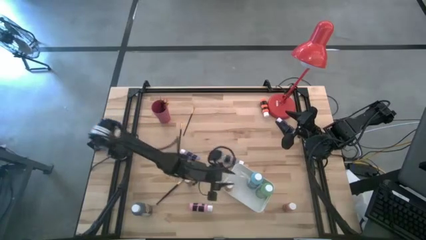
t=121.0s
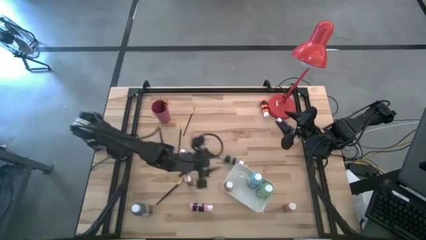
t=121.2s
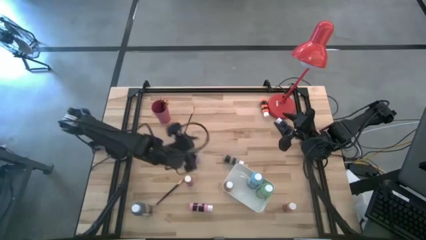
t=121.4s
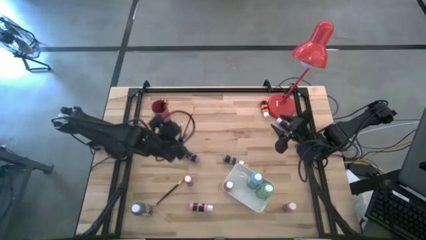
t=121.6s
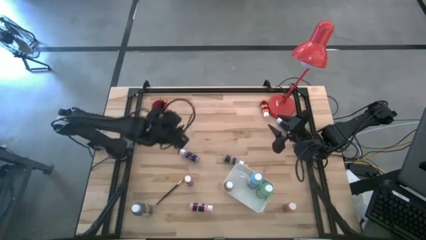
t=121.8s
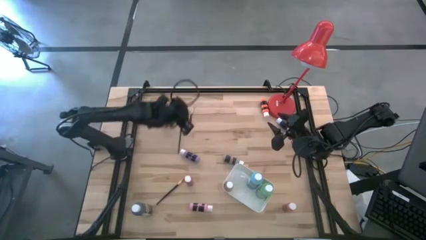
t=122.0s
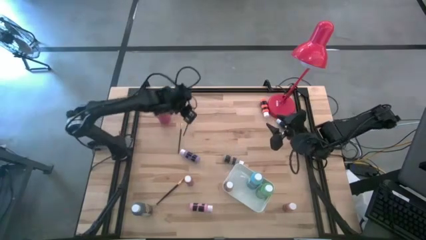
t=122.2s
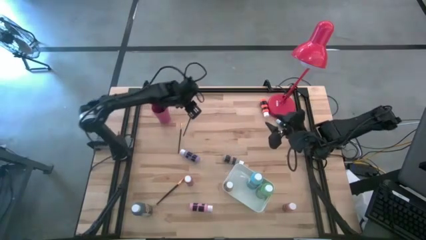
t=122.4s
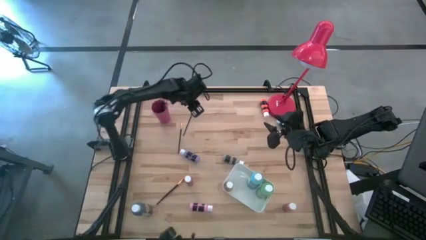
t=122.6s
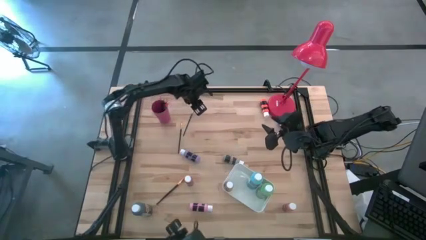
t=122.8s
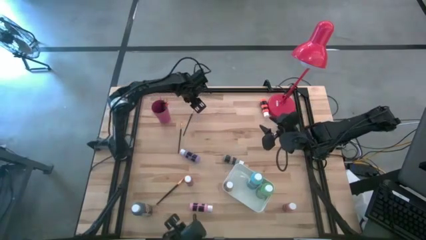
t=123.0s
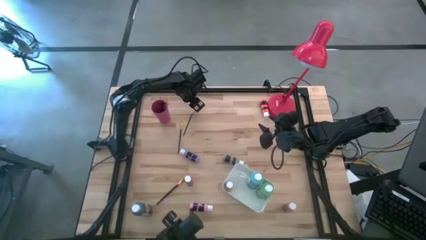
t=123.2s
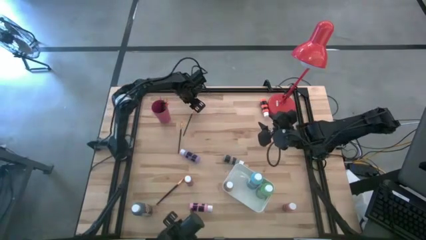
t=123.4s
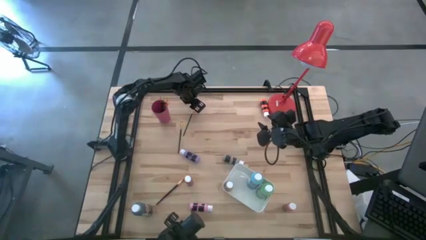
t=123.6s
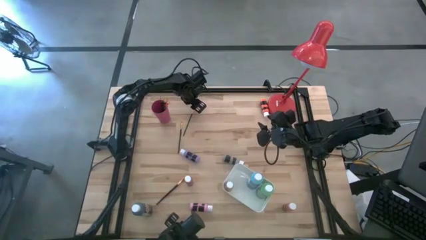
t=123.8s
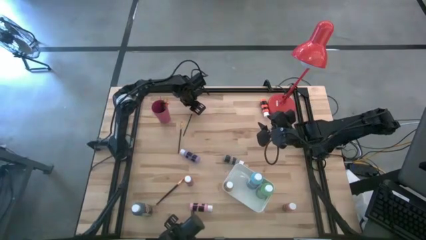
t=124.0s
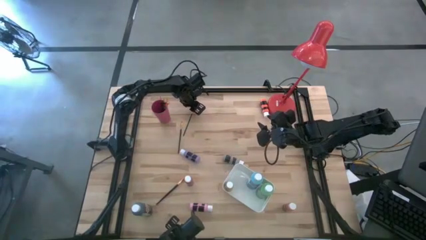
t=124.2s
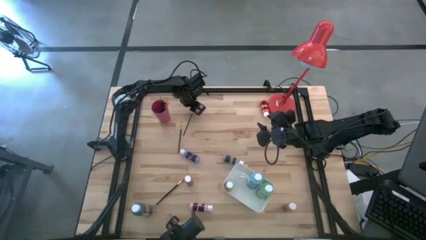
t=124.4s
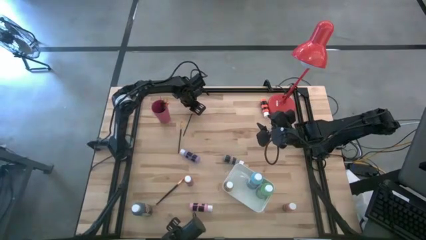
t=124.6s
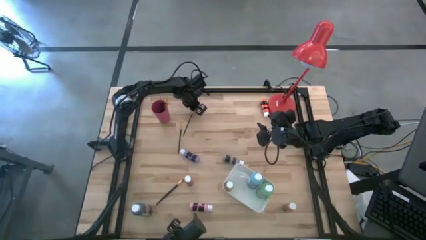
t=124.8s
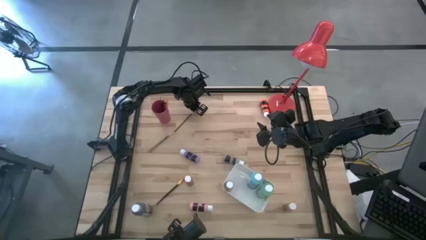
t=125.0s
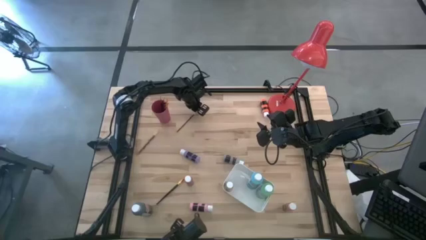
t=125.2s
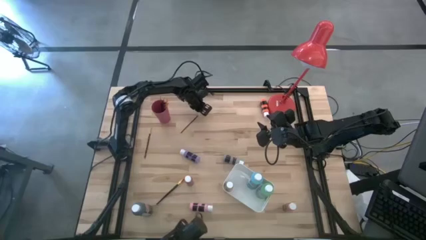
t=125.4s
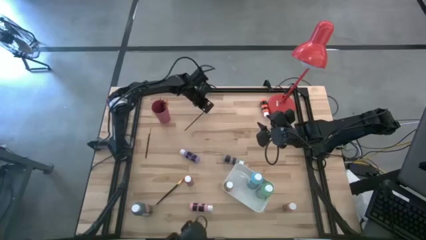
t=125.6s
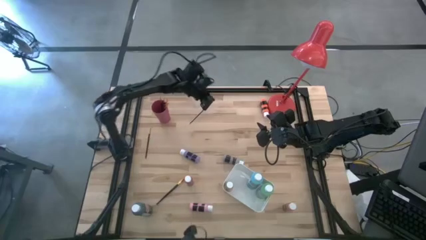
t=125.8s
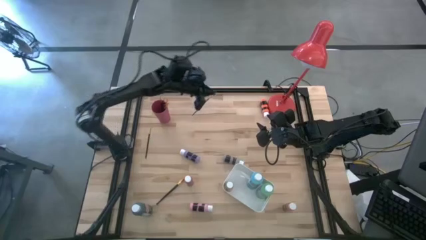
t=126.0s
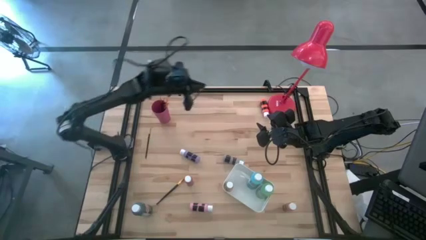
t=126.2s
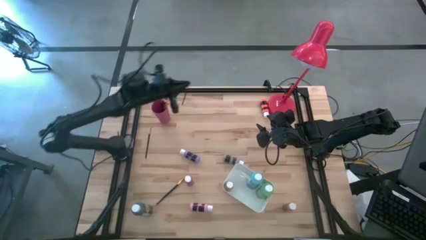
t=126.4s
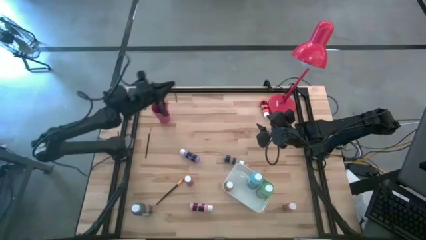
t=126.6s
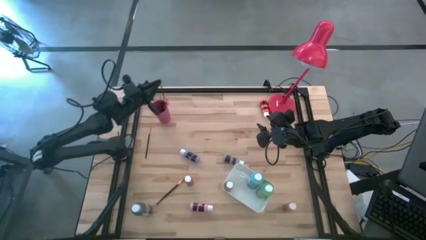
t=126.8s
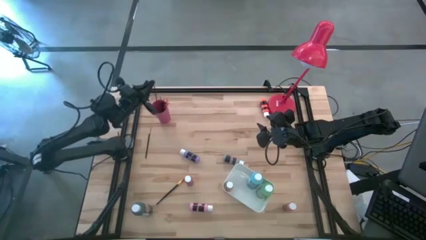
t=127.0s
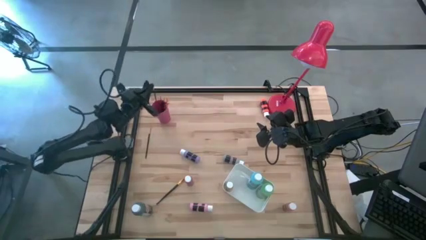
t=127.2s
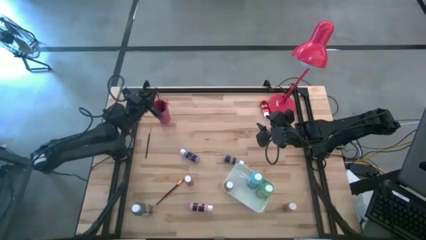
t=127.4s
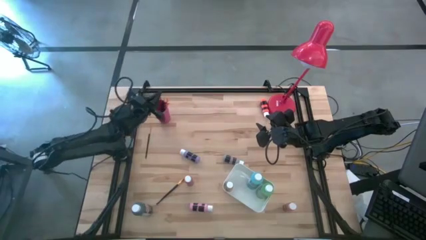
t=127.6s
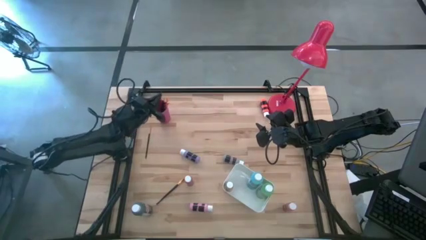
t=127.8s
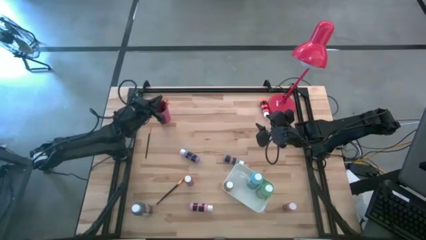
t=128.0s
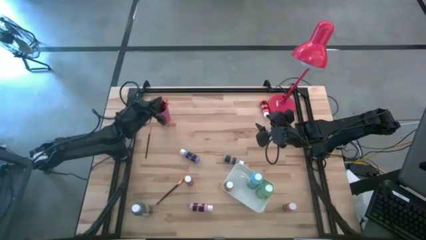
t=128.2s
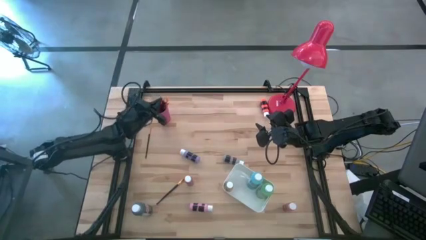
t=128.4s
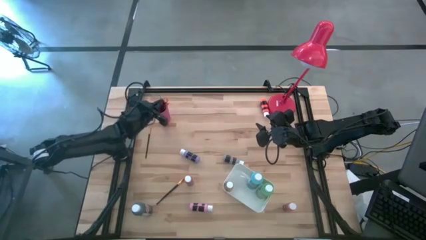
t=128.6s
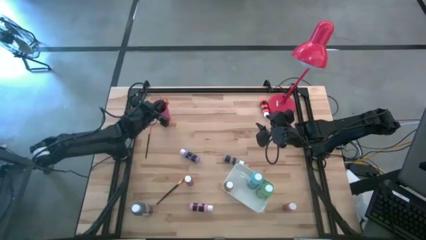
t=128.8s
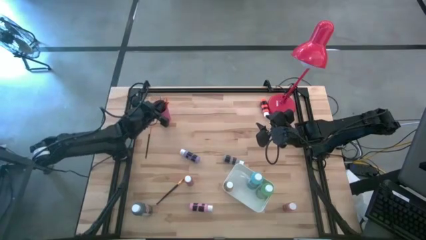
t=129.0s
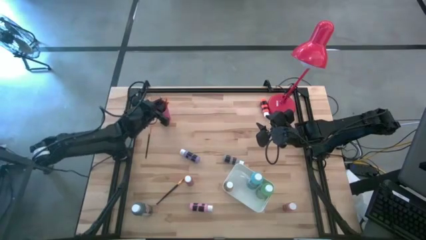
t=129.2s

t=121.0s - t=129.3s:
Task: Pick & Place Paint Supplies
Put the orange paintbrush into the pink cup

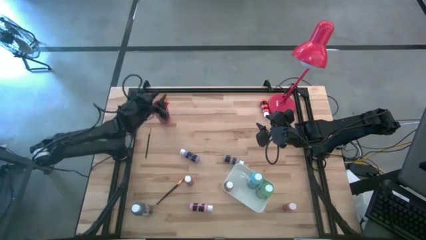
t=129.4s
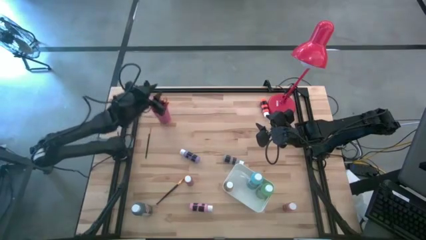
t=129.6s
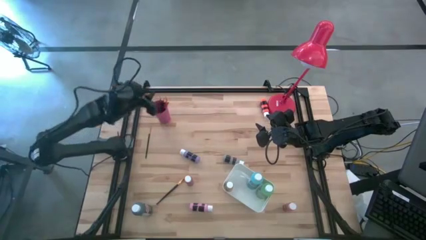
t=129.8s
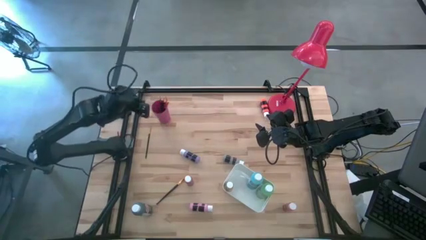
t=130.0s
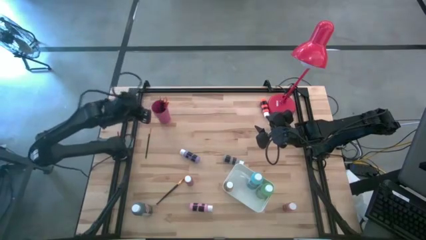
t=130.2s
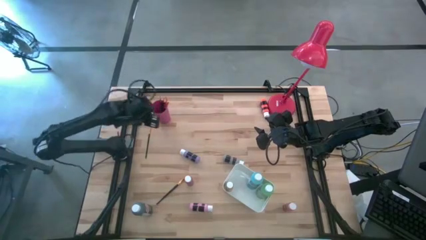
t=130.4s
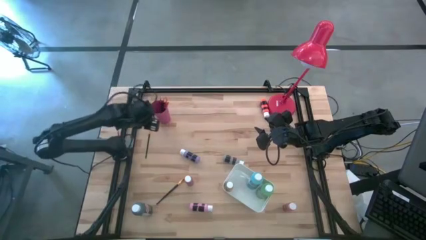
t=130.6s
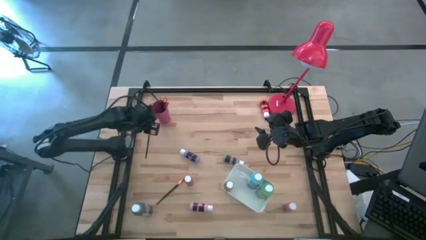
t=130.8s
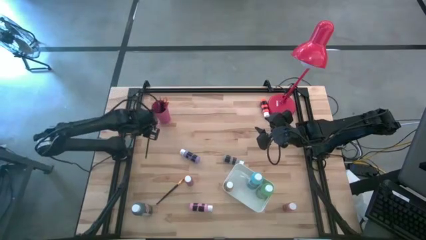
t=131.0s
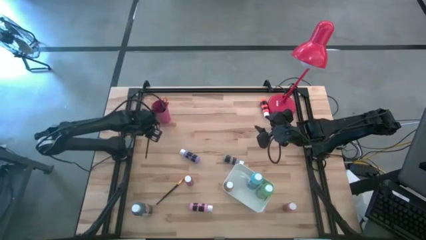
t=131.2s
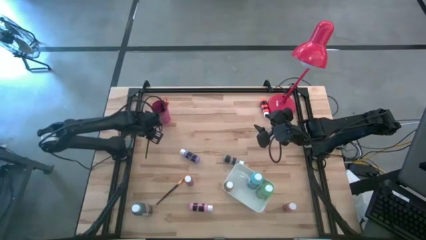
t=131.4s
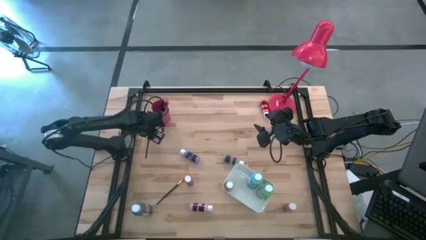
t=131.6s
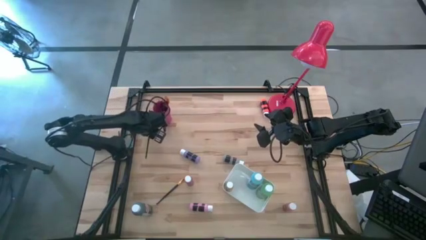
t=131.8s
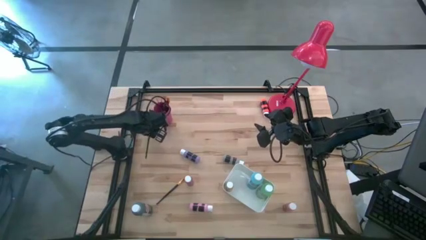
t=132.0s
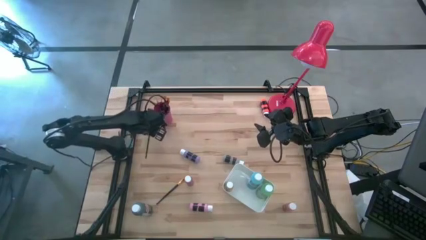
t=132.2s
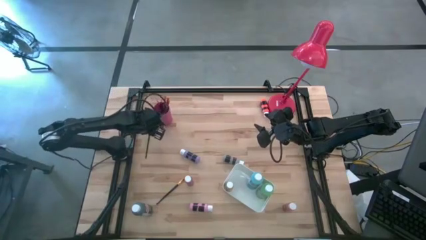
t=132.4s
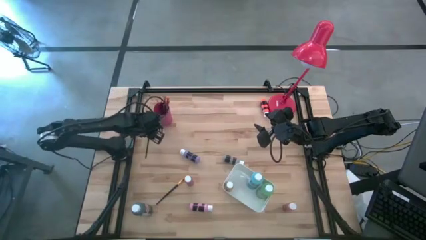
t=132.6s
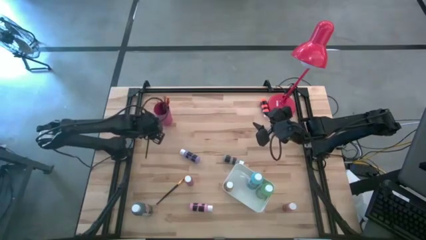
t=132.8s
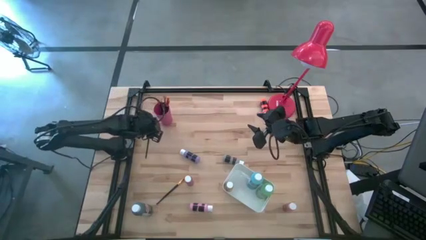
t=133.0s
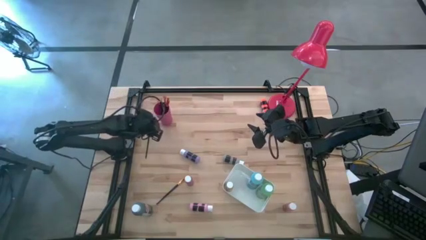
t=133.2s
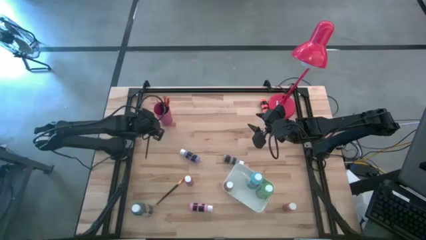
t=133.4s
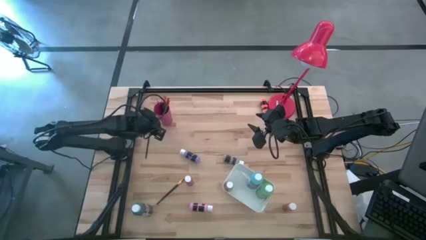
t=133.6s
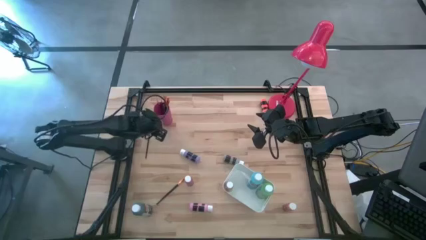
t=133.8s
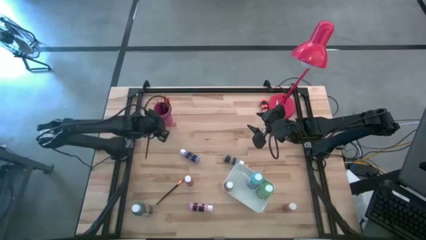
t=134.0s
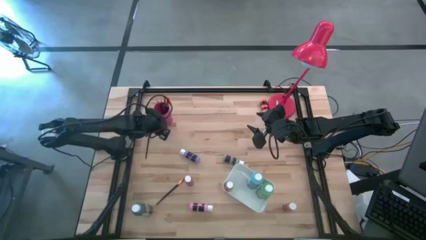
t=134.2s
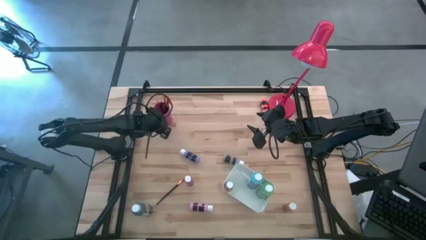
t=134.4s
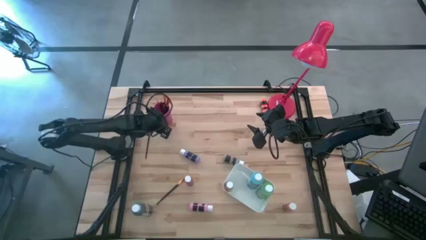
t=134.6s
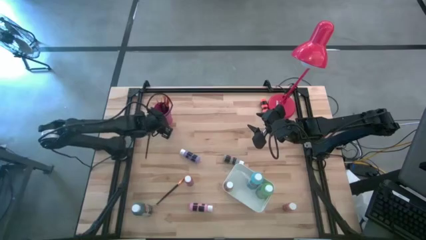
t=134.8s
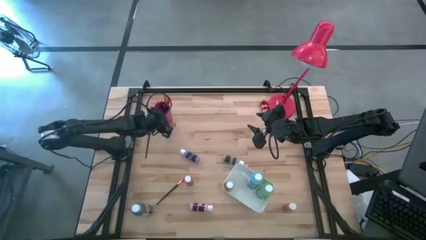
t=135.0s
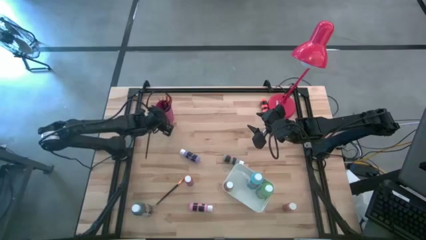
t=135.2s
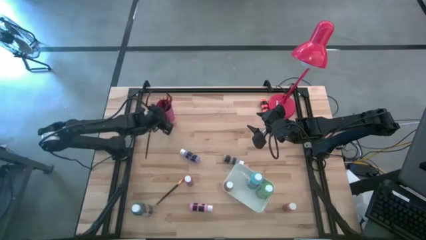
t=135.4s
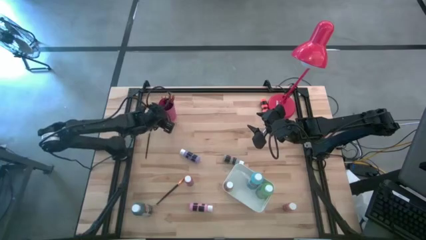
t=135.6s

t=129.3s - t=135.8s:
Adjust the pink cup
